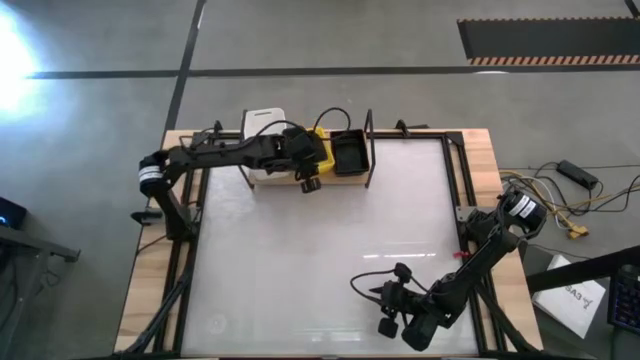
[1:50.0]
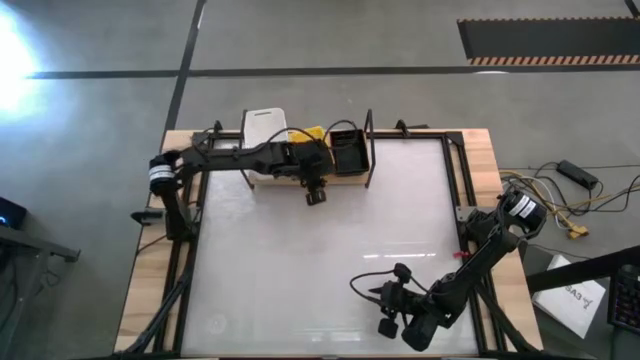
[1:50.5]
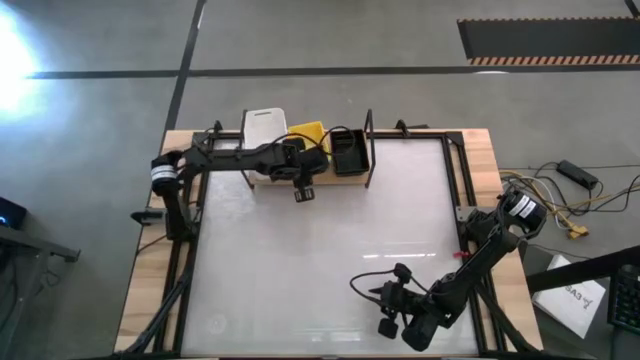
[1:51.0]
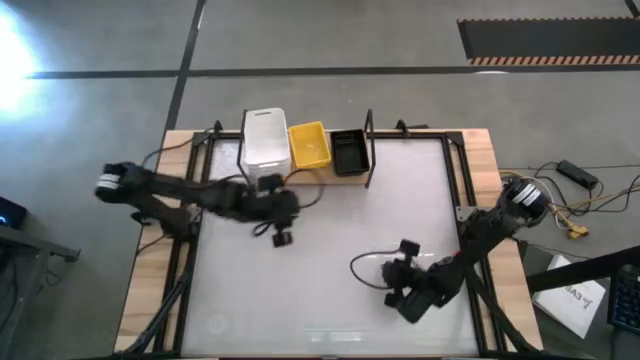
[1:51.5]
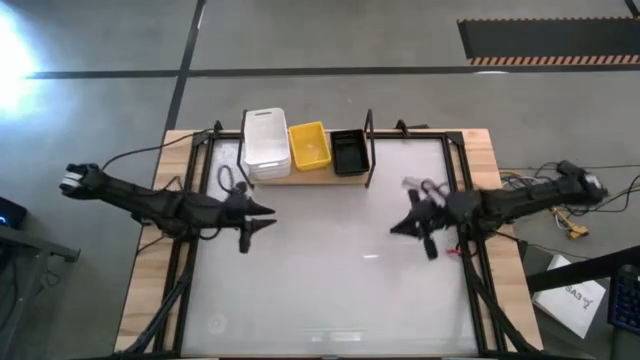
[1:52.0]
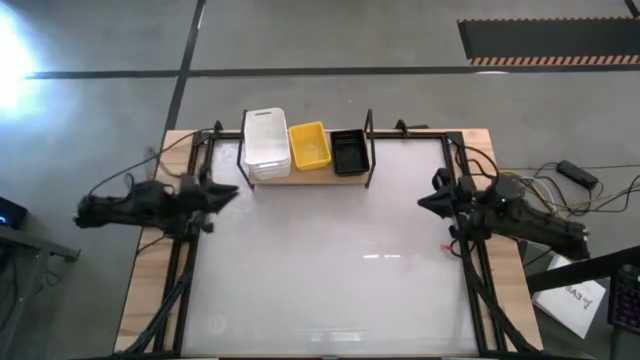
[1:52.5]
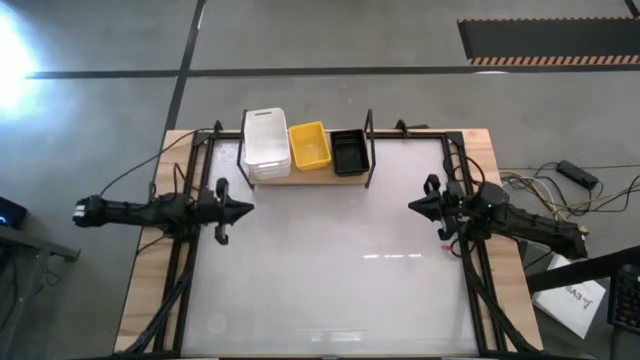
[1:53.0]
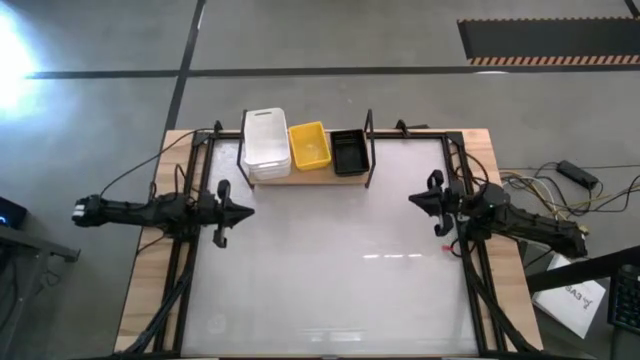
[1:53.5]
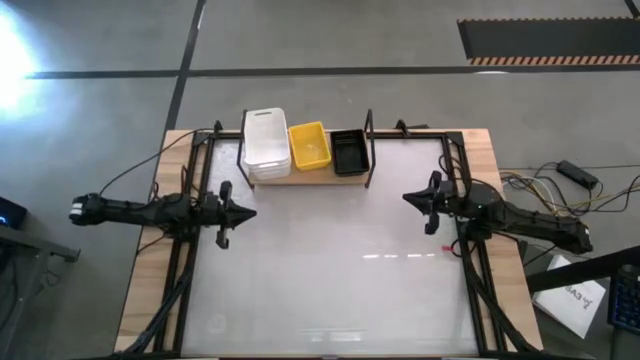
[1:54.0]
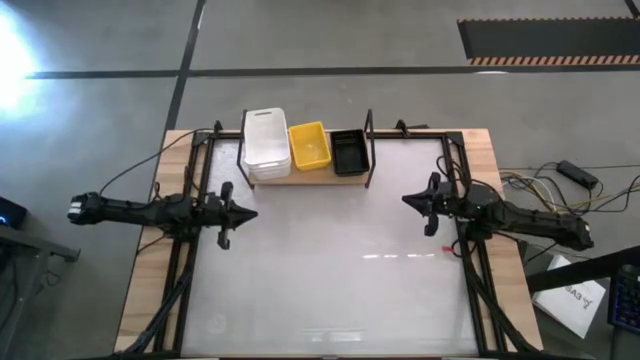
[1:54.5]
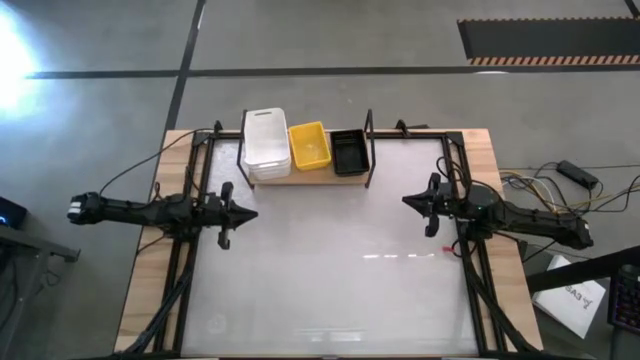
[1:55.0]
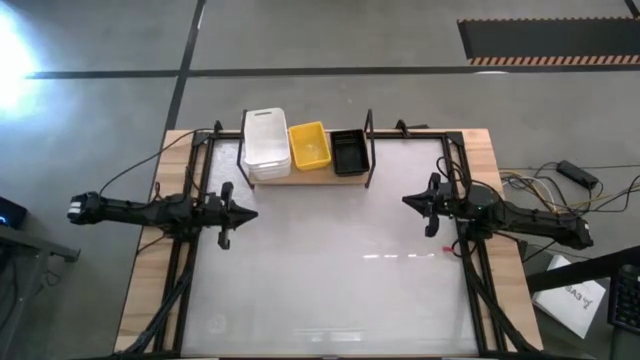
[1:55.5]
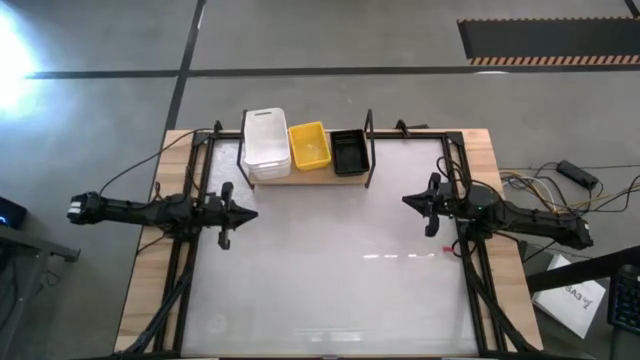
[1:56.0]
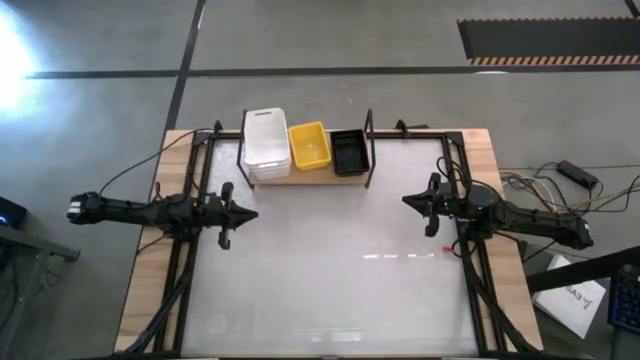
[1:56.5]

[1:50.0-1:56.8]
Task: Stack baskets on shelf by color
Return to Home Position

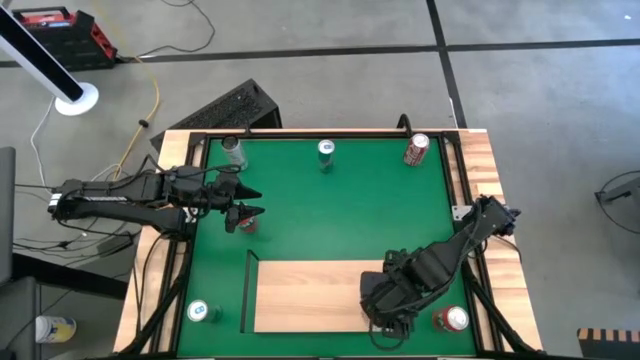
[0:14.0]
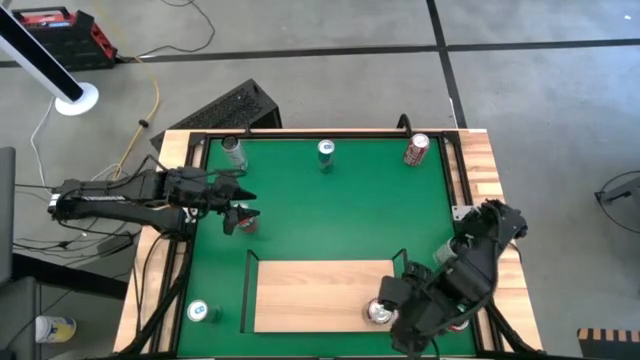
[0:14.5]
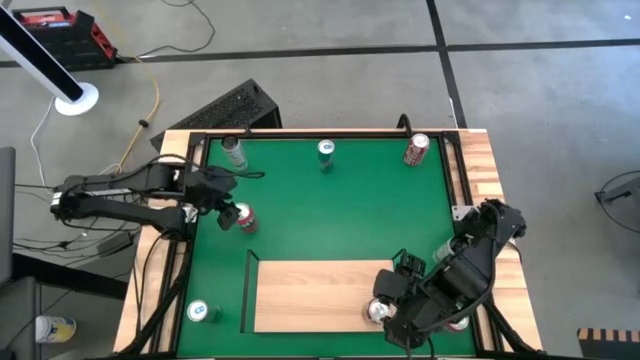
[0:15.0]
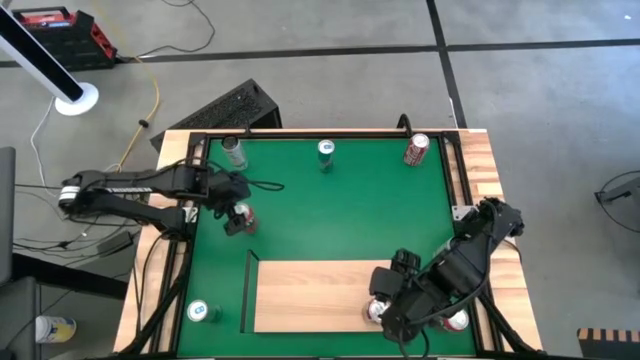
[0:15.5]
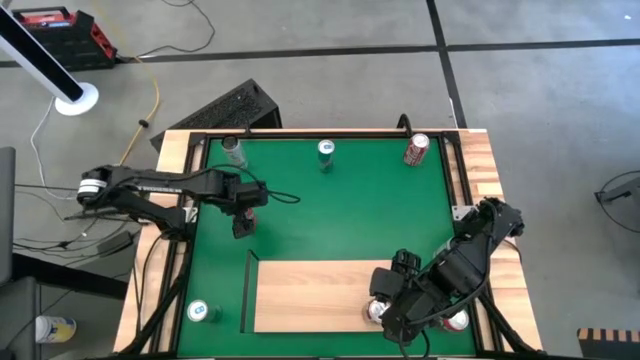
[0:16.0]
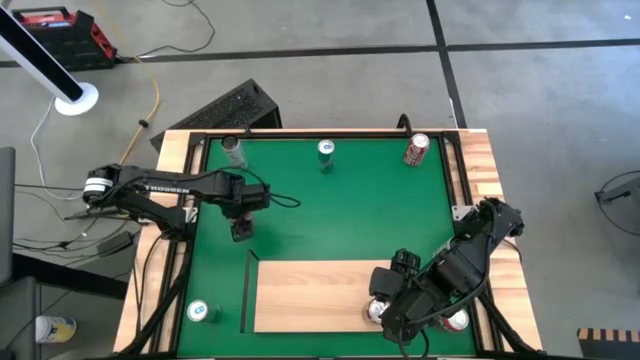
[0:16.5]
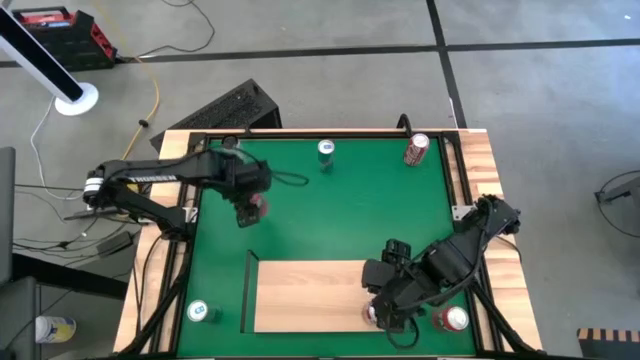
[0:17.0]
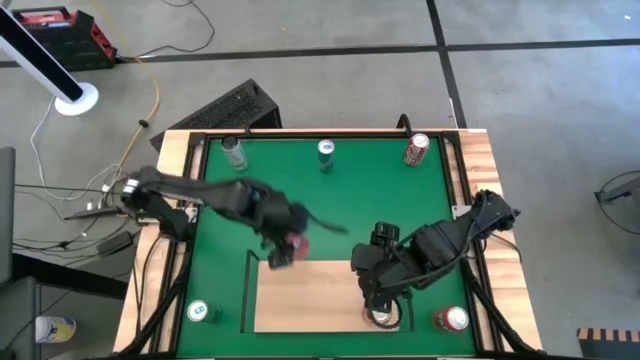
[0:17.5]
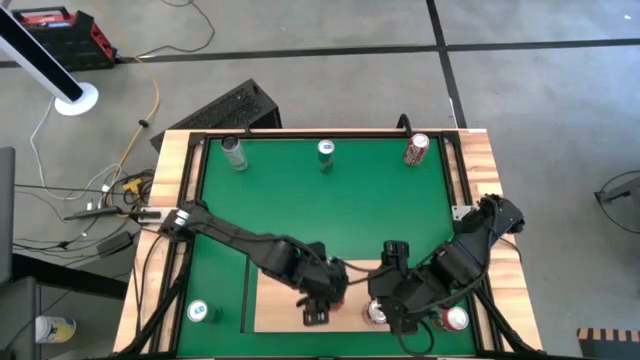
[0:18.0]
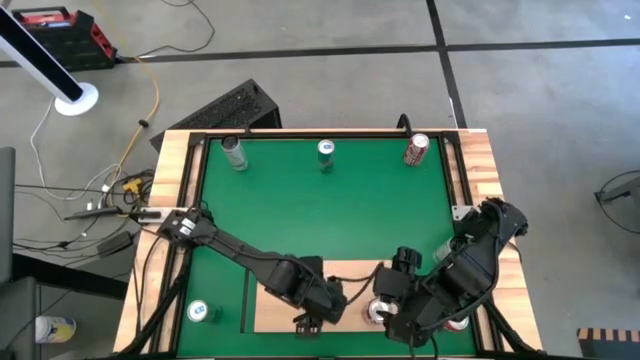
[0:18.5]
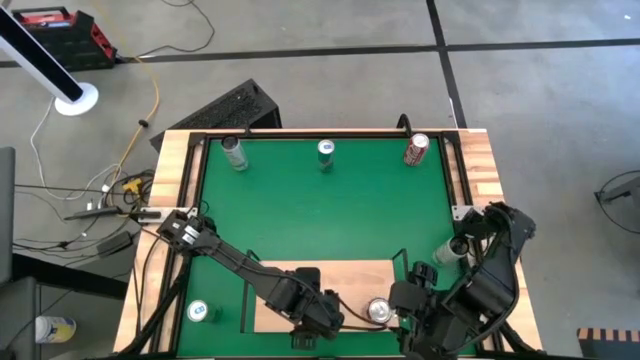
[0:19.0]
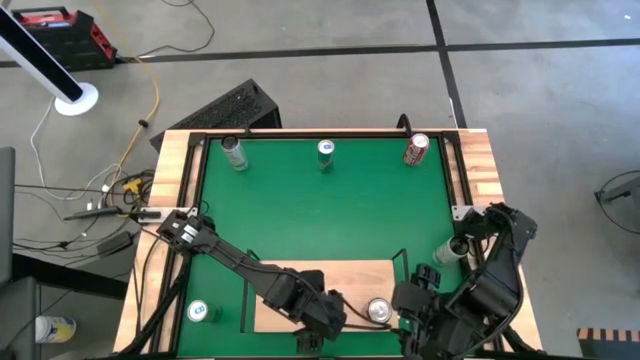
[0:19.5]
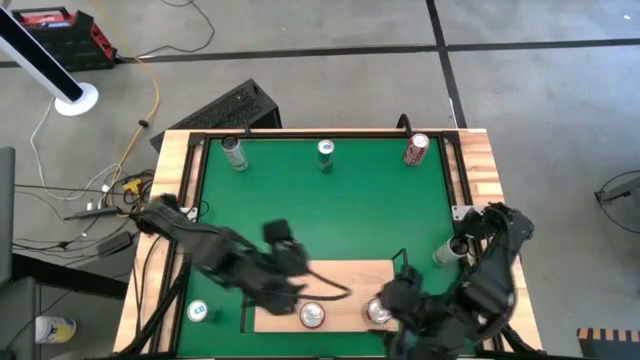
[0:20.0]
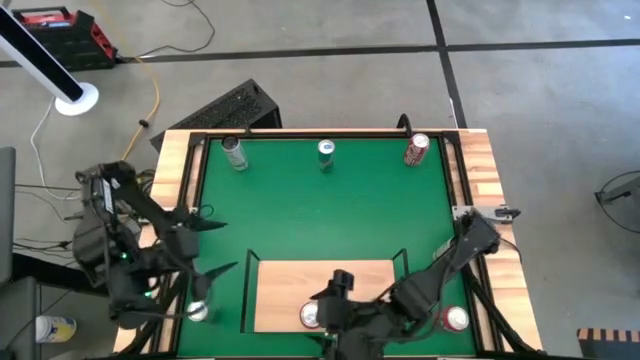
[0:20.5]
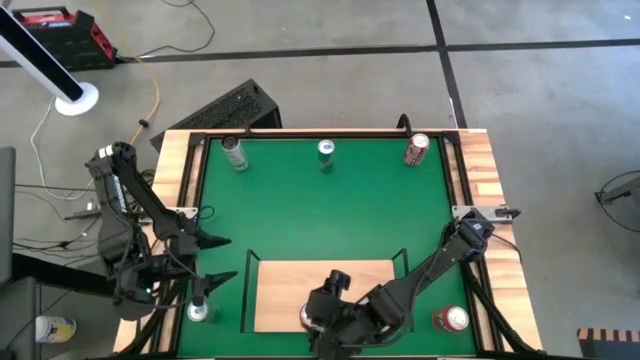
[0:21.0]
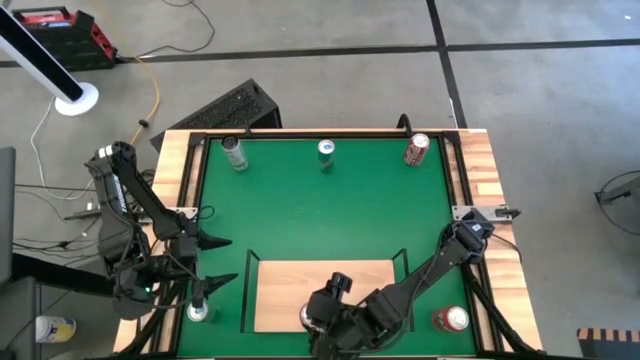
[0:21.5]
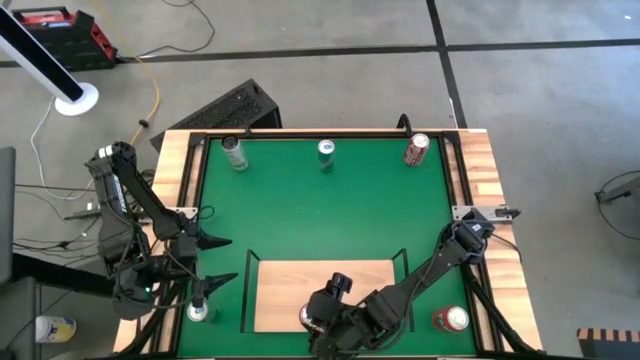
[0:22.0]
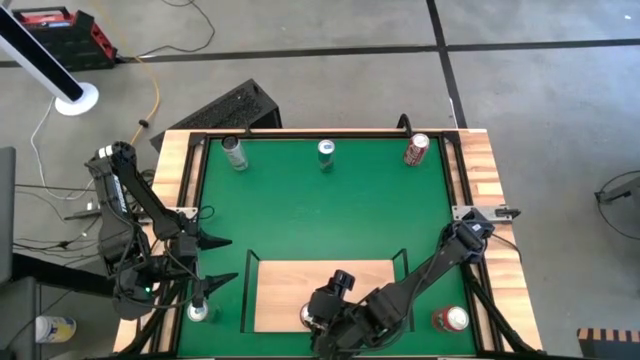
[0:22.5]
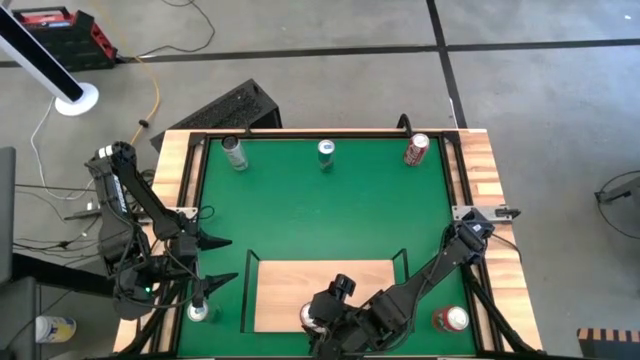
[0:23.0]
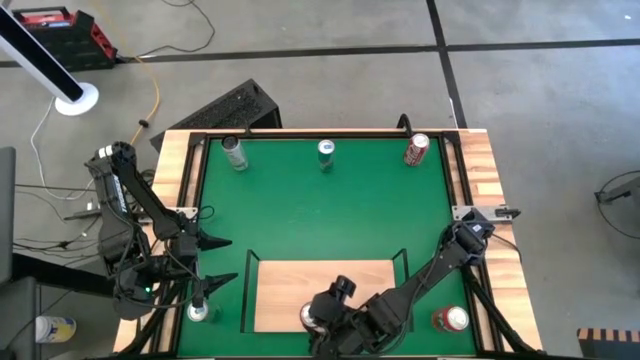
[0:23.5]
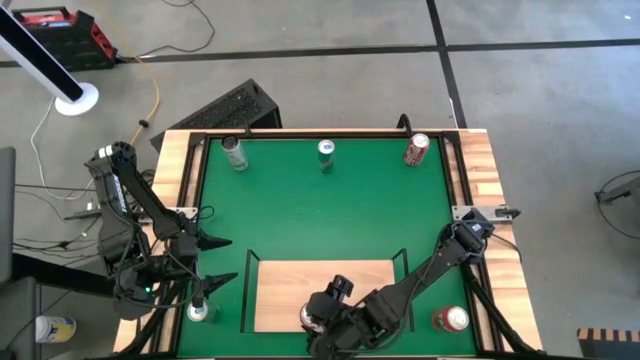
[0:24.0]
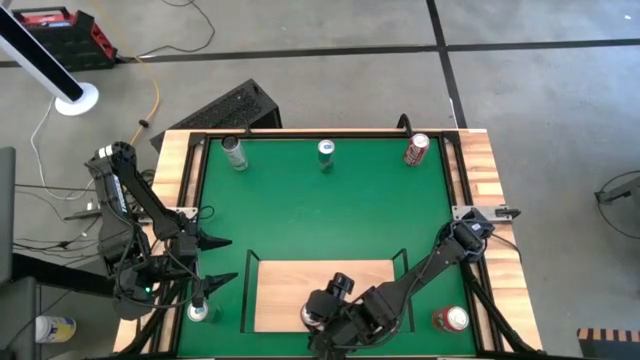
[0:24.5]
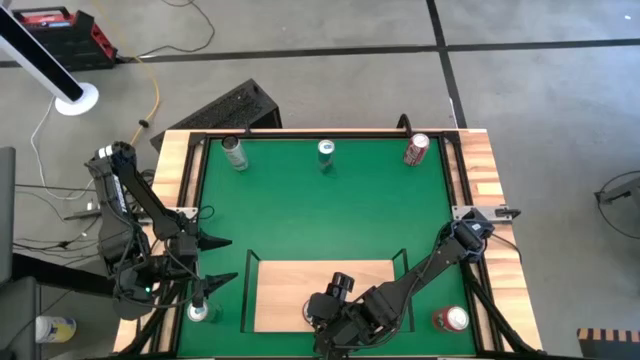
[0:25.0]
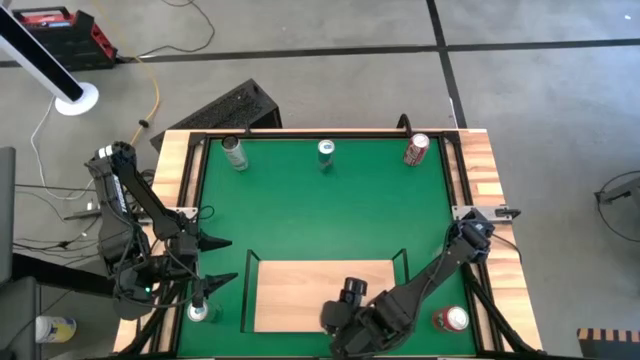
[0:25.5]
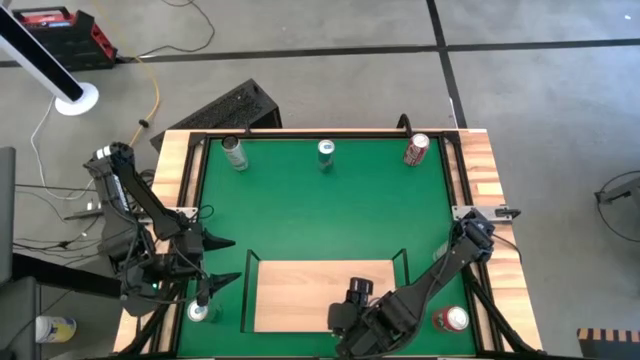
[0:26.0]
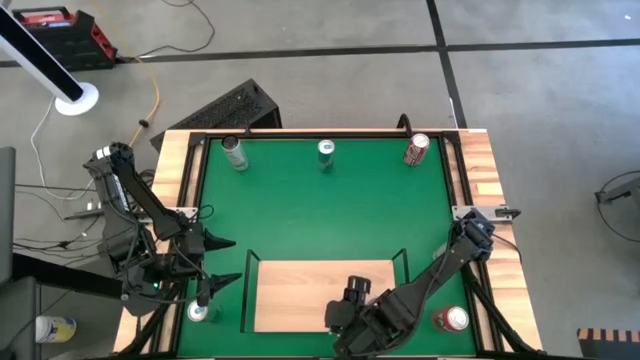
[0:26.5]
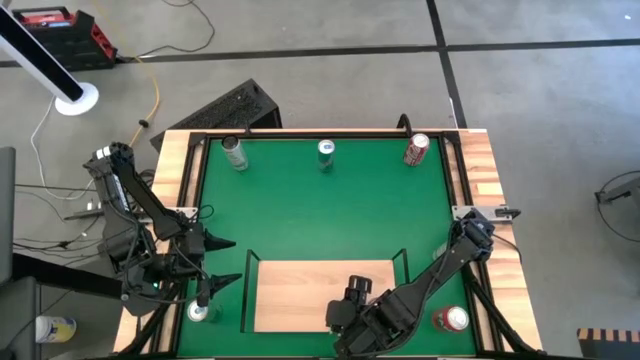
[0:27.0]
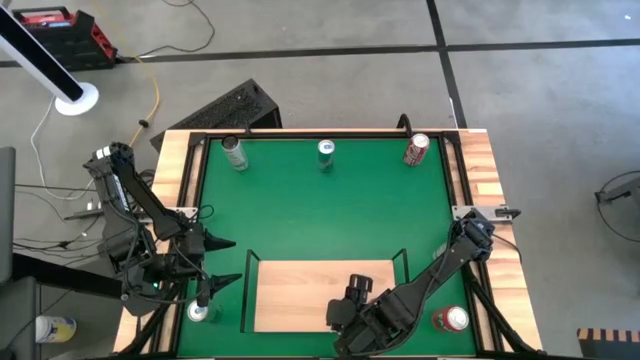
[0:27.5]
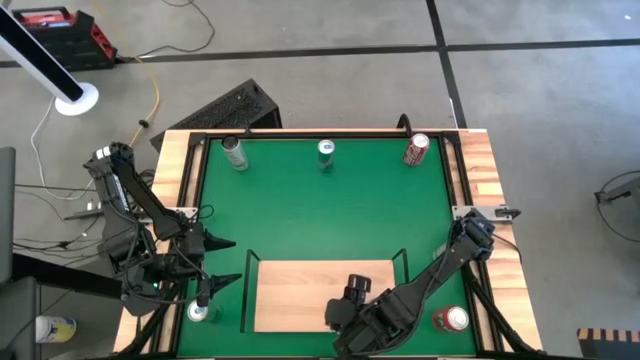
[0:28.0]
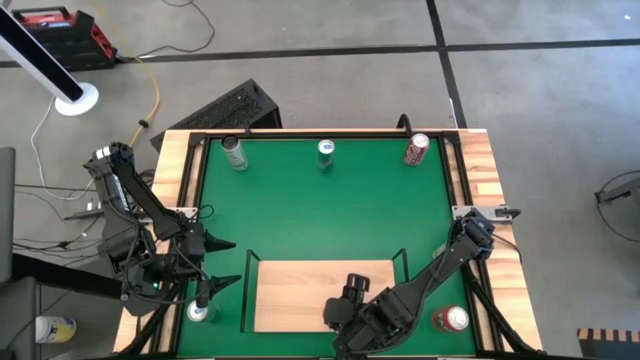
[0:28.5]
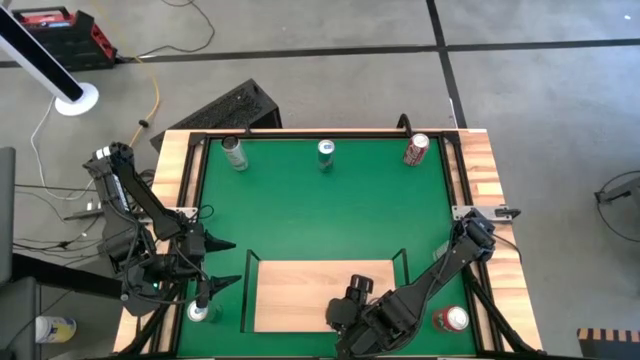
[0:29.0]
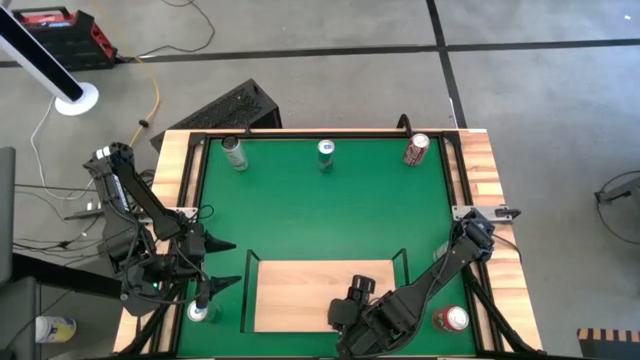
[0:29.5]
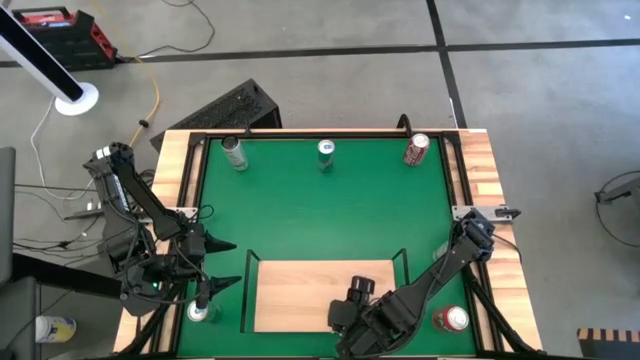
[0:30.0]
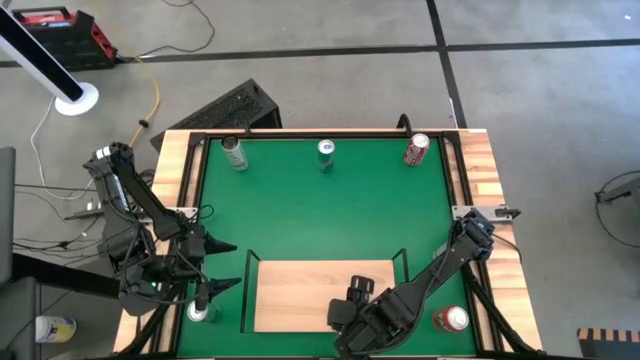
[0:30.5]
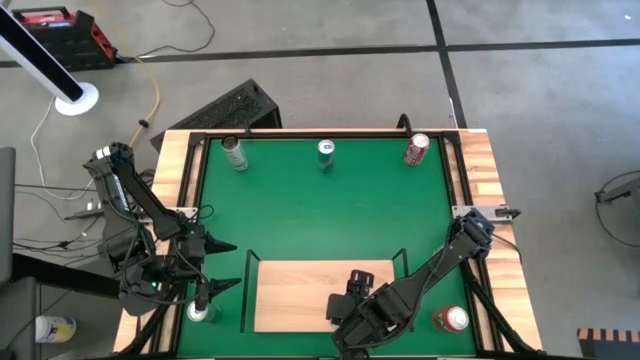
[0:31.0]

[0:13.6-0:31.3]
Task: Place canned beverage on shelf
Put the left orange soda can on the shelf
